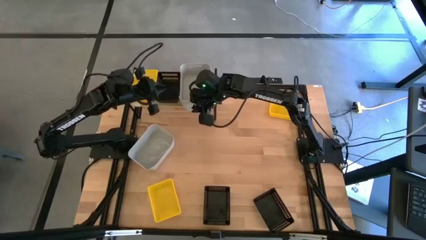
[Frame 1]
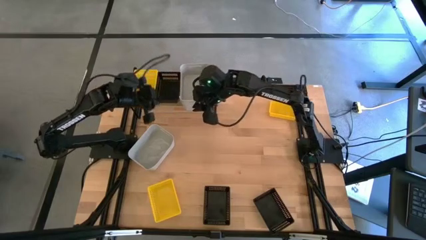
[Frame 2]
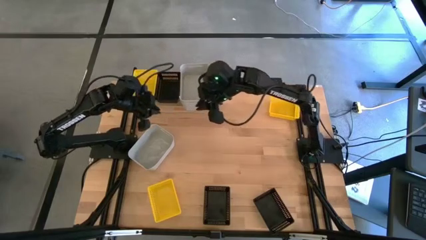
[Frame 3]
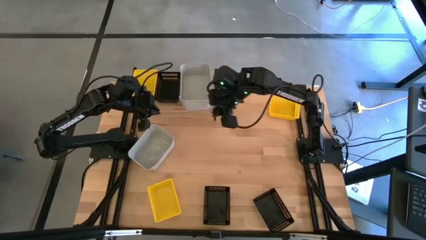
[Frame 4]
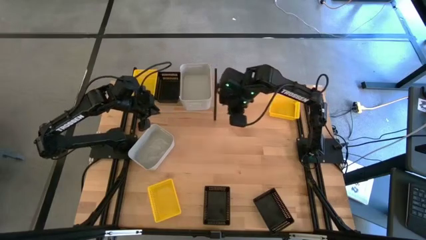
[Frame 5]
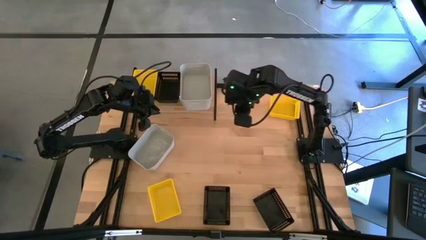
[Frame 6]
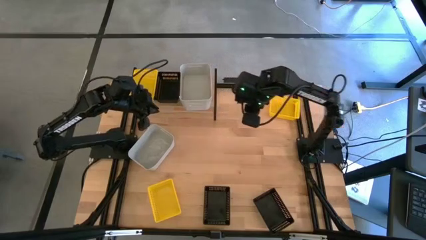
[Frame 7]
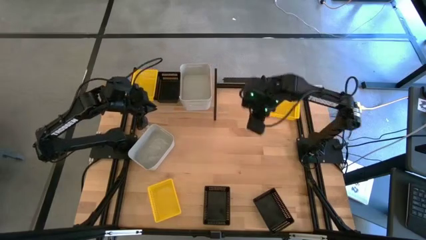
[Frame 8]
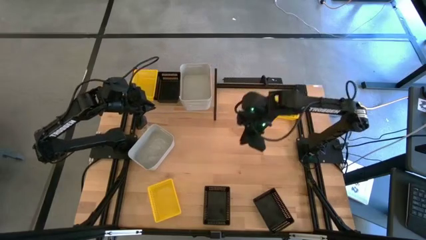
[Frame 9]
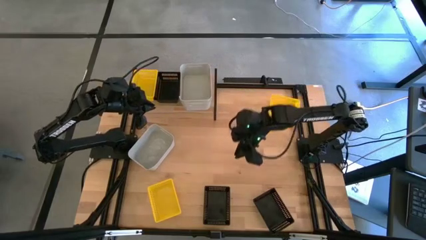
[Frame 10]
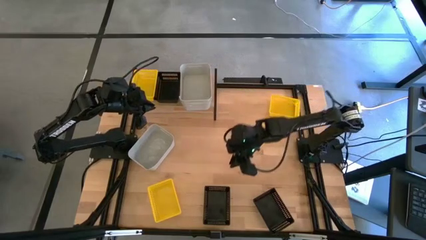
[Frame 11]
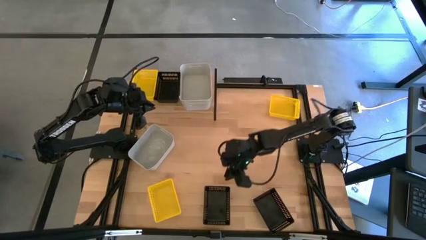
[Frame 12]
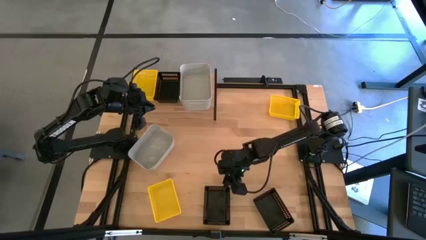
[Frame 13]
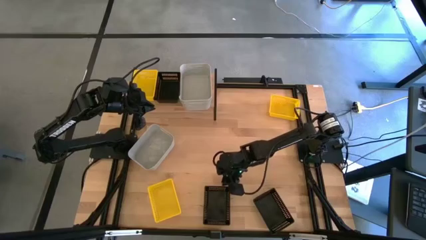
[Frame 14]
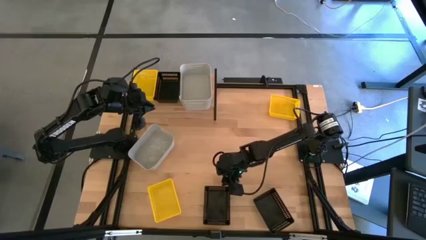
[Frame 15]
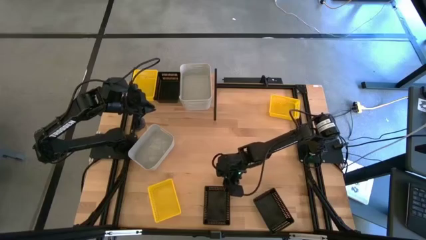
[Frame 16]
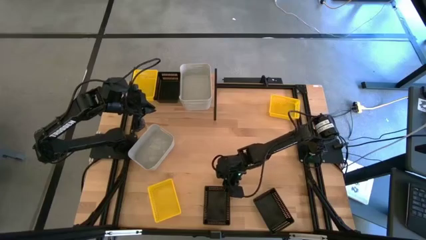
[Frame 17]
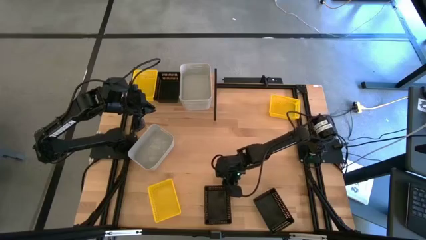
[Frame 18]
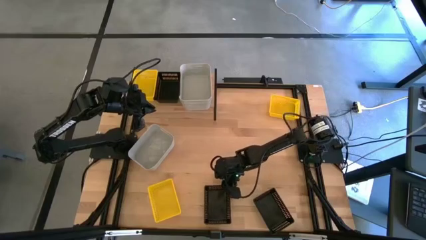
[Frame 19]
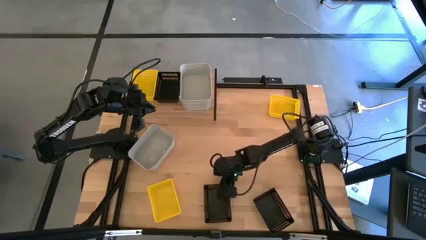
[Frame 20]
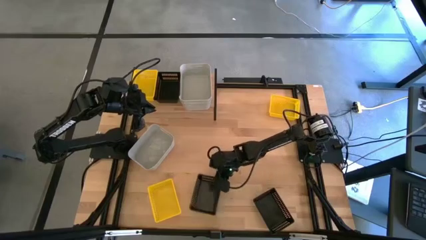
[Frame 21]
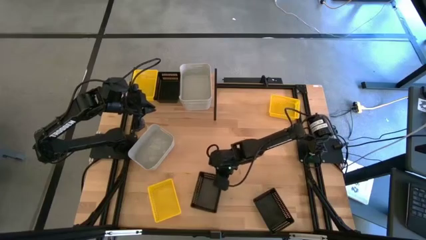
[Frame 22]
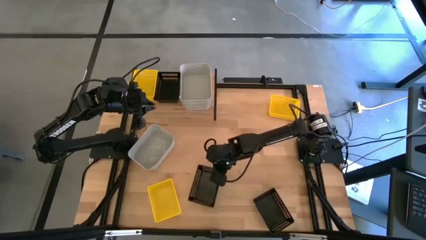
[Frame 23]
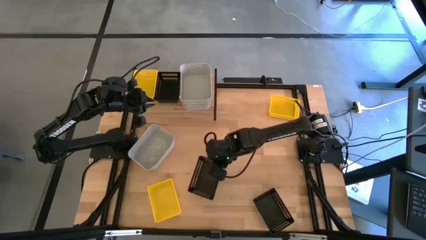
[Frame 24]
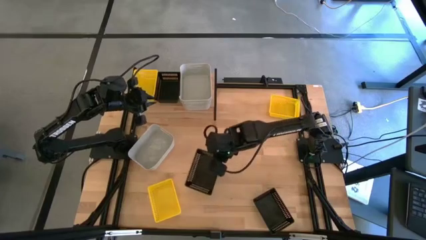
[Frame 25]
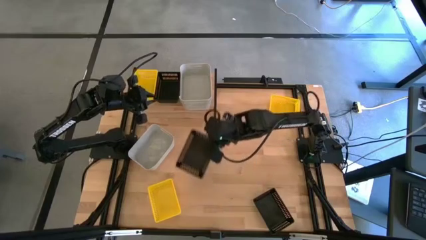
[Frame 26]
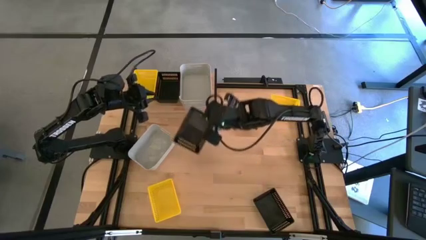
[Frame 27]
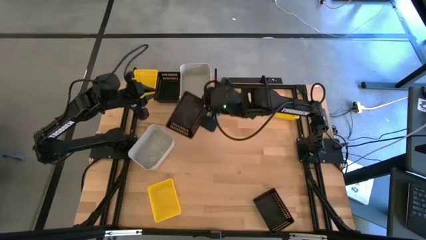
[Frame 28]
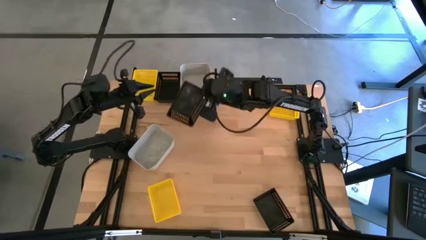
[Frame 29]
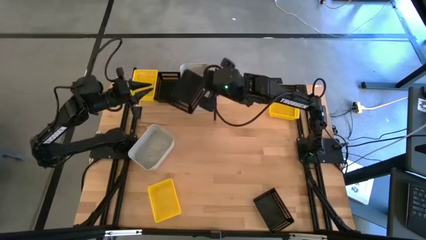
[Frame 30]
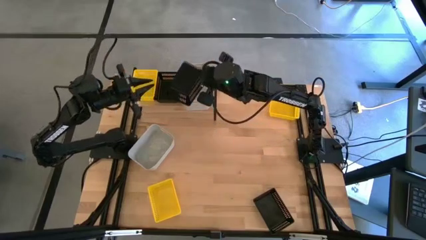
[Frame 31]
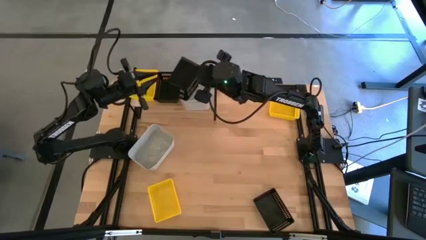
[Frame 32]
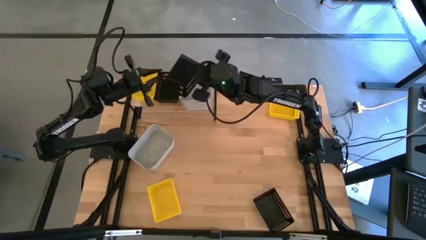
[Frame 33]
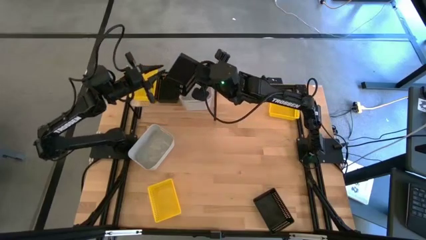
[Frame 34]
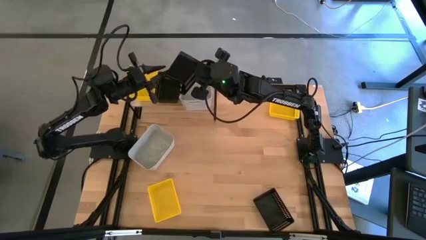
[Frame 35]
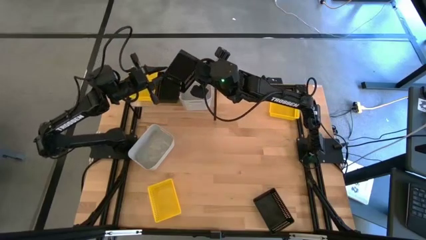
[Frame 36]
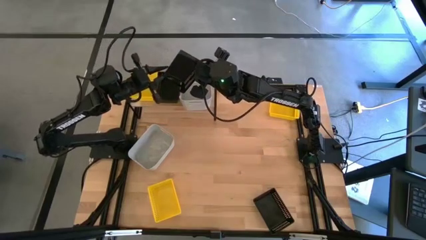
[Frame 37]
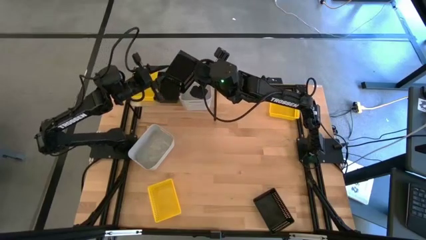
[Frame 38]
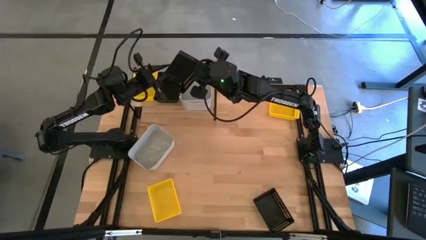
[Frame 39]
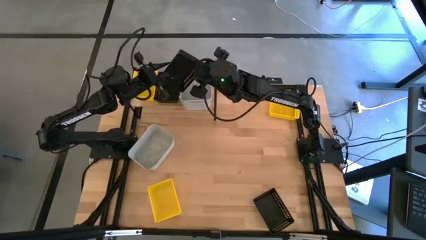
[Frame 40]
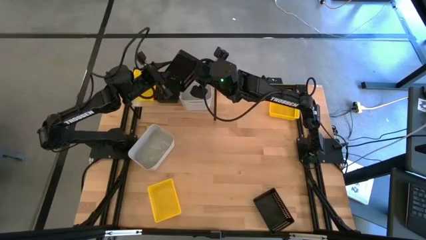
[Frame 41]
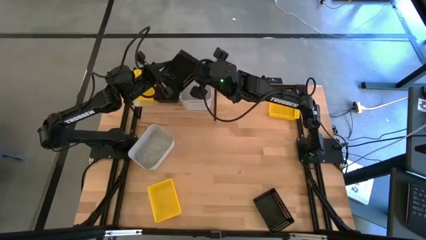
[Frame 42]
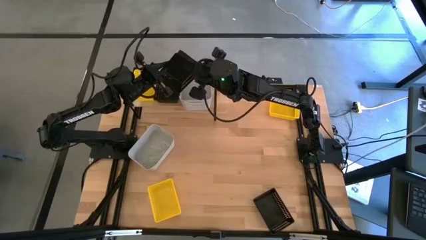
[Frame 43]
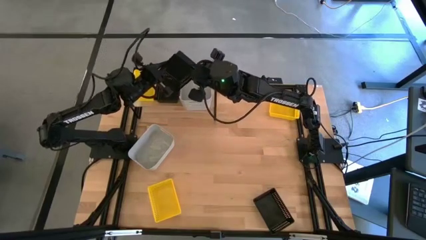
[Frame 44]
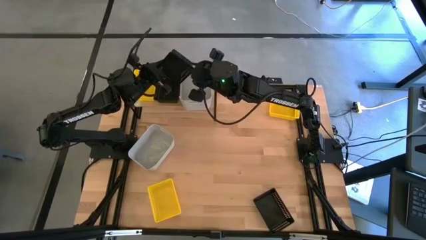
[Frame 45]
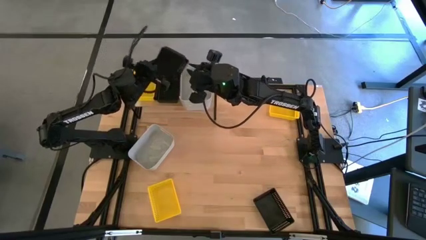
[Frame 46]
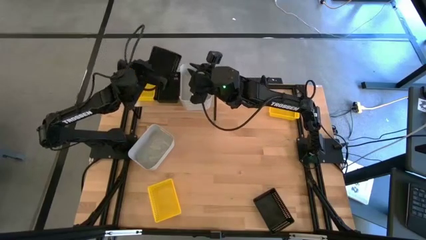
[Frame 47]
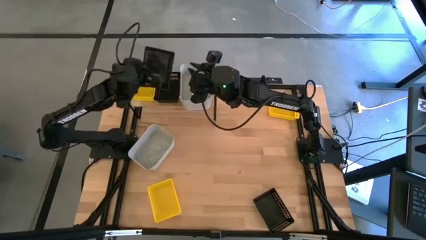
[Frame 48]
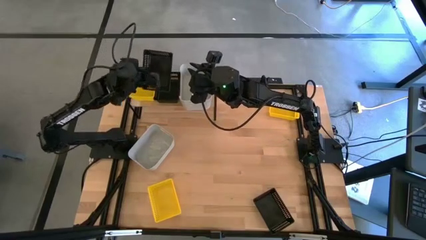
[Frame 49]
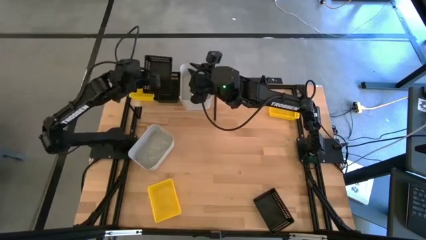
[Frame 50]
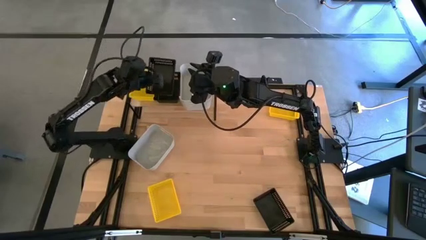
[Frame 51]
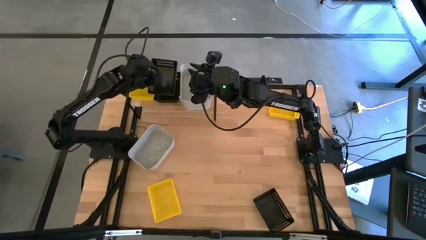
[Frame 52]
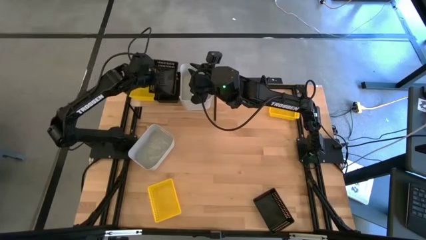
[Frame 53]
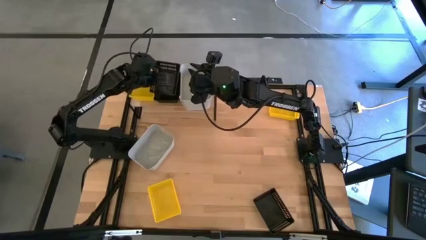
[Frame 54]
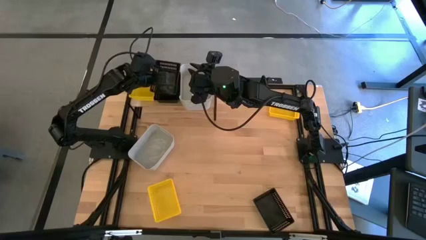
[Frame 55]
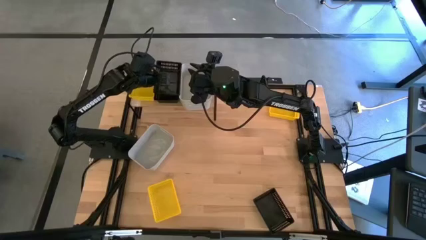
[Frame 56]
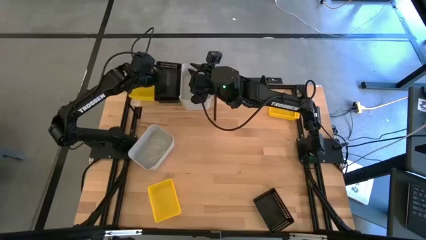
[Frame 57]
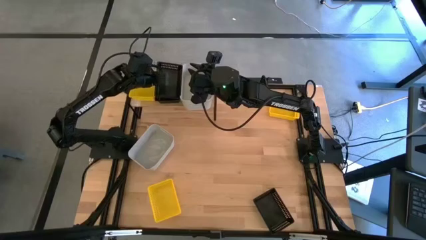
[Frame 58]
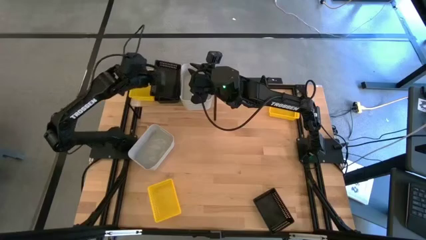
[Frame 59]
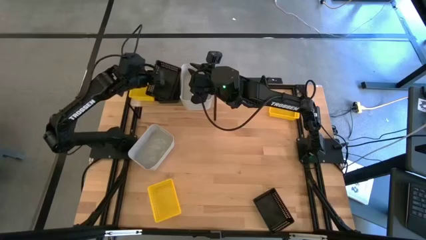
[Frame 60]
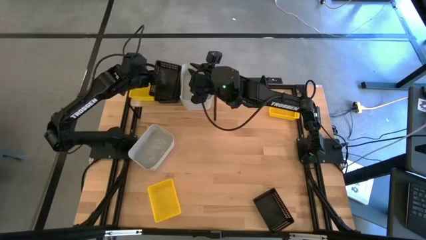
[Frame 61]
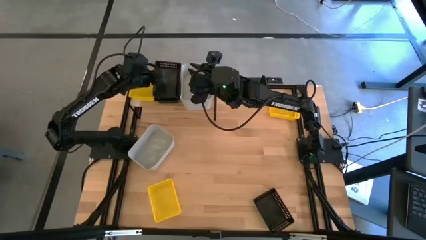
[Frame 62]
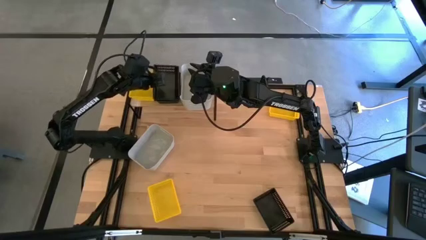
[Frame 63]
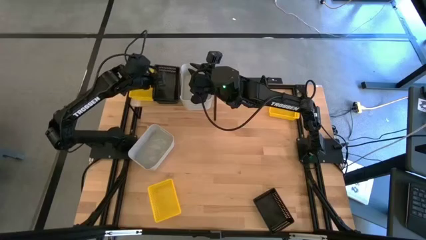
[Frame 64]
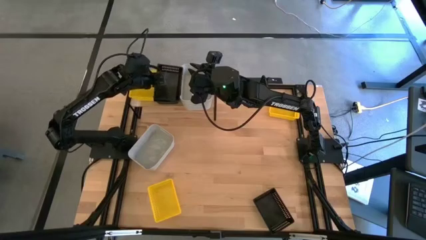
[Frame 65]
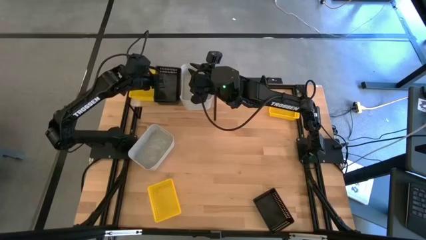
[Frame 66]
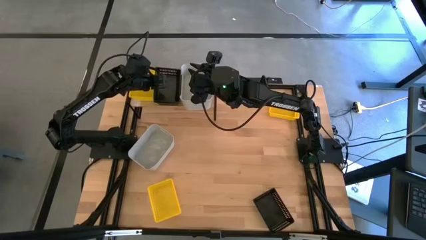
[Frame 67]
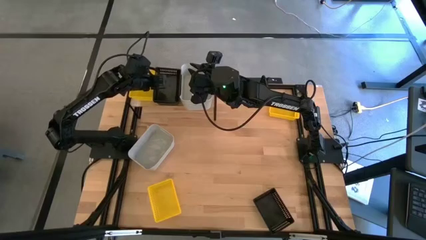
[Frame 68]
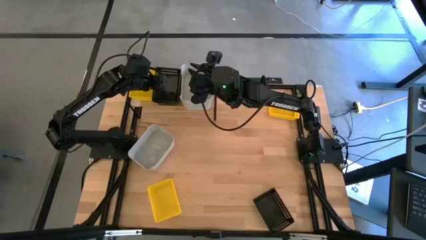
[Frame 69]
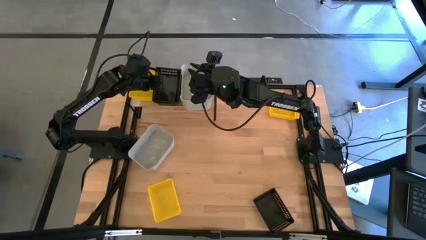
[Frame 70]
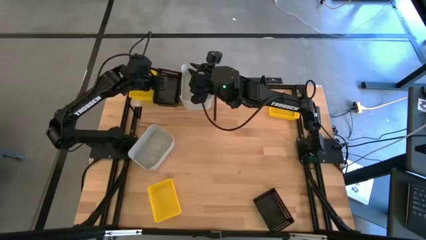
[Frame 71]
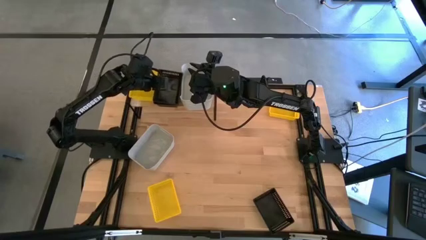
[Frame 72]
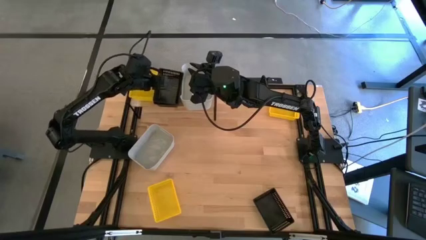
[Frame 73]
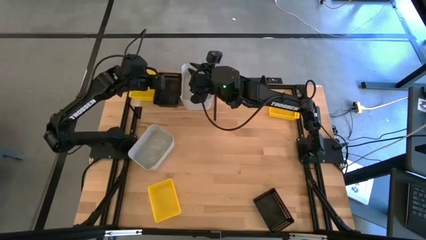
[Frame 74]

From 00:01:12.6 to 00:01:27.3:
Task: Stack baskets on shelf by color
Stack the left black bin on top of the other black bin on the shelf
